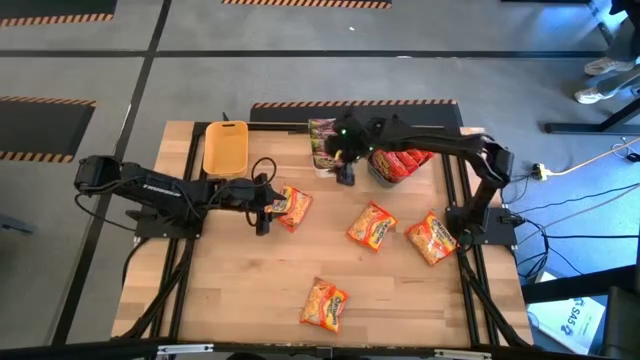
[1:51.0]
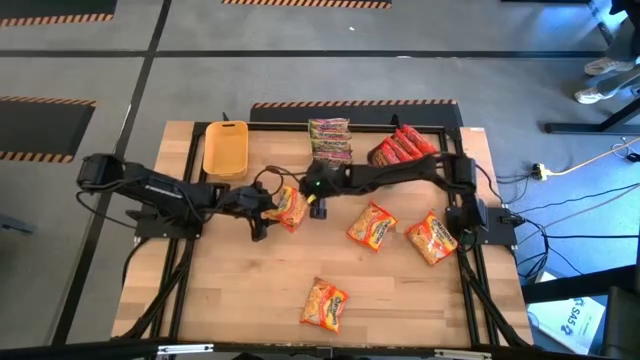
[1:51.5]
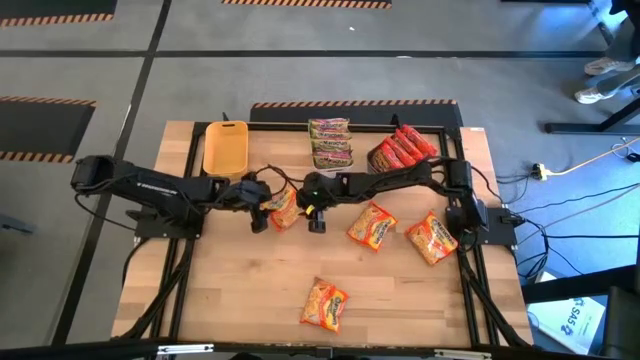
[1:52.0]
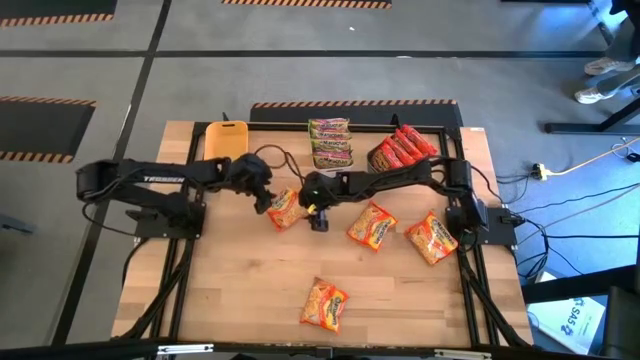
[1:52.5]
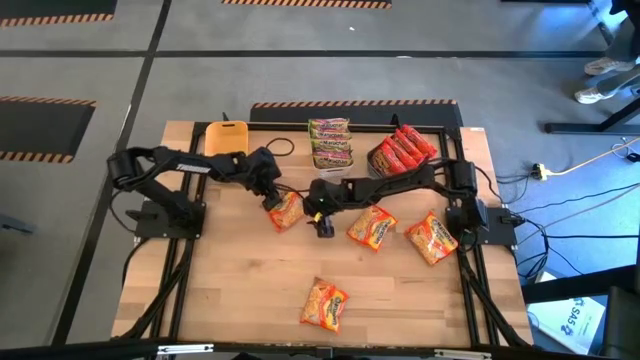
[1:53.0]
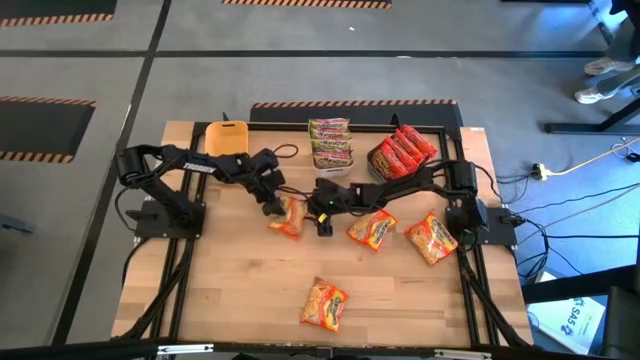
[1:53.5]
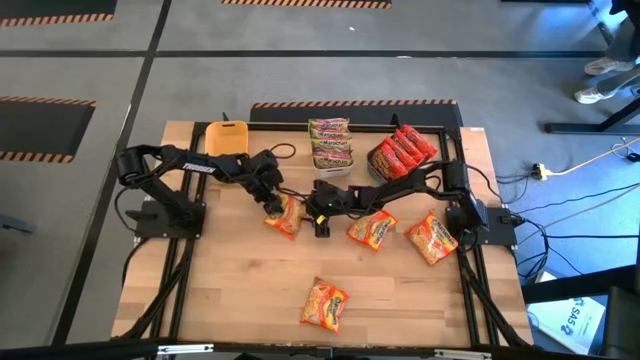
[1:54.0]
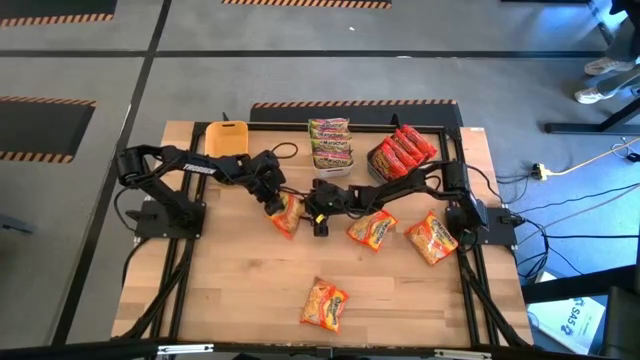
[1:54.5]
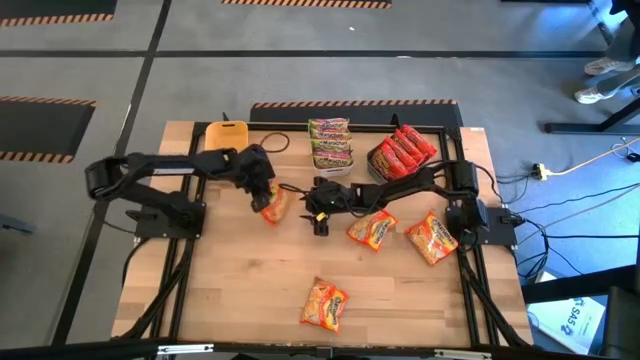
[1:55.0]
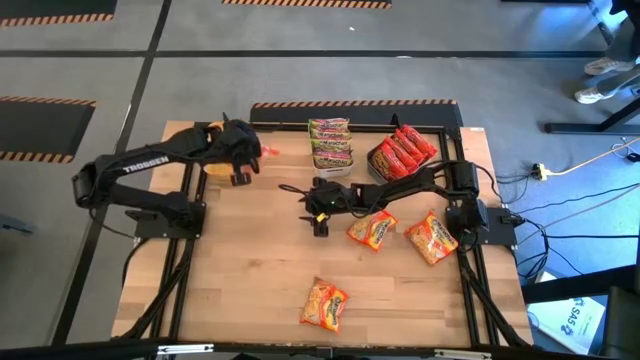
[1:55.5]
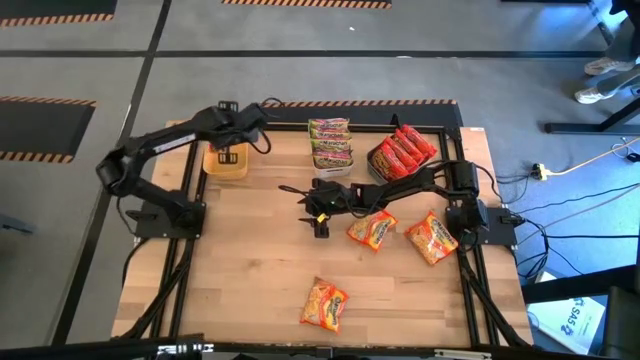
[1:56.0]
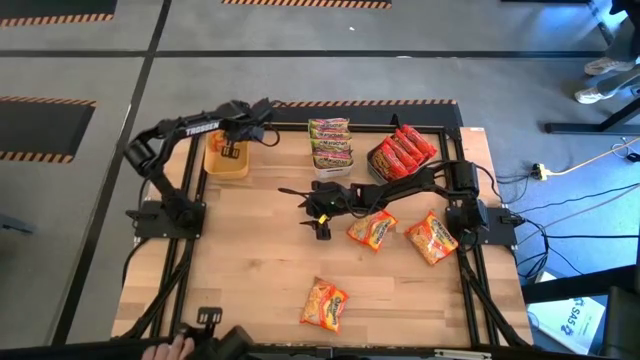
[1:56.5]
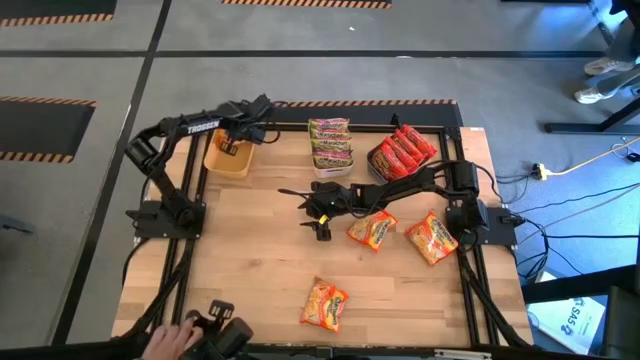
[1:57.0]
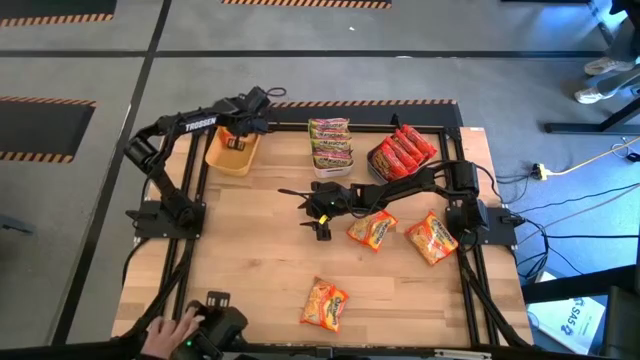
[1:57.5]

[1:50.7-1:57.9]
Task: Sort Maruchan noodles
Put the orange noodle pack into the yellow bin

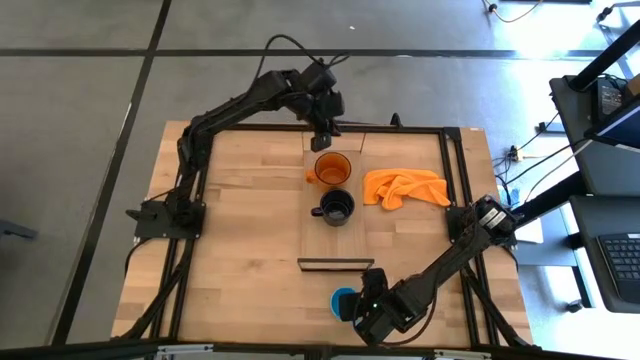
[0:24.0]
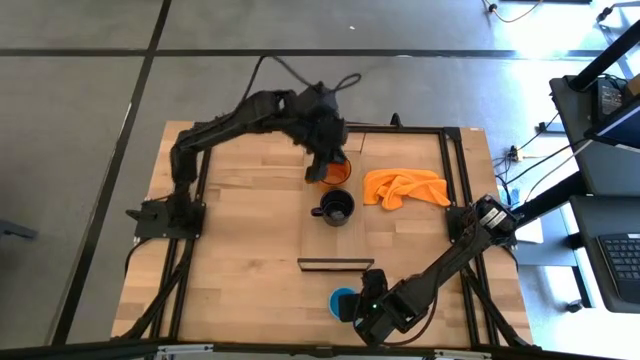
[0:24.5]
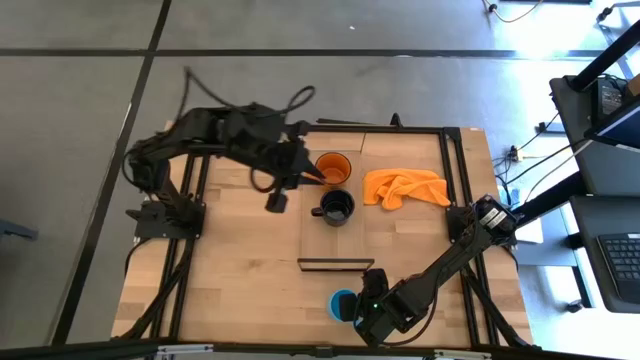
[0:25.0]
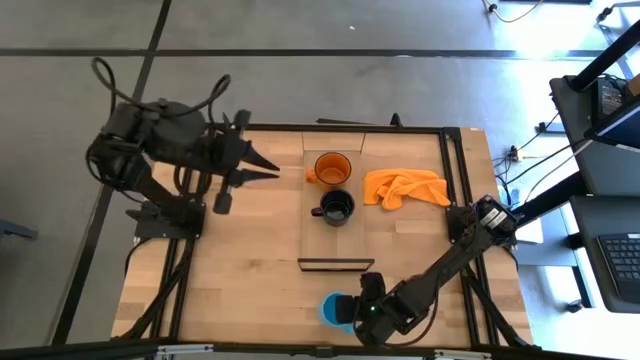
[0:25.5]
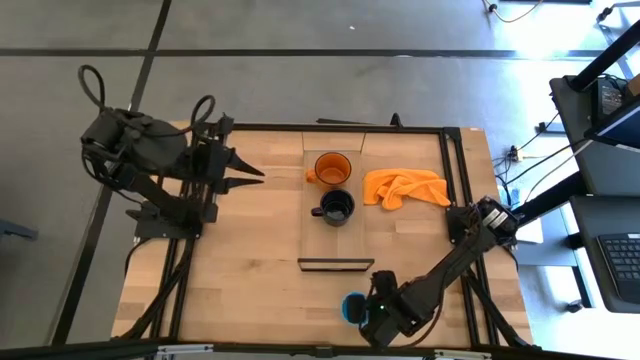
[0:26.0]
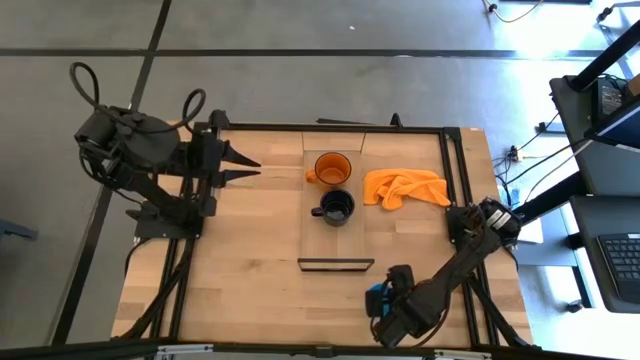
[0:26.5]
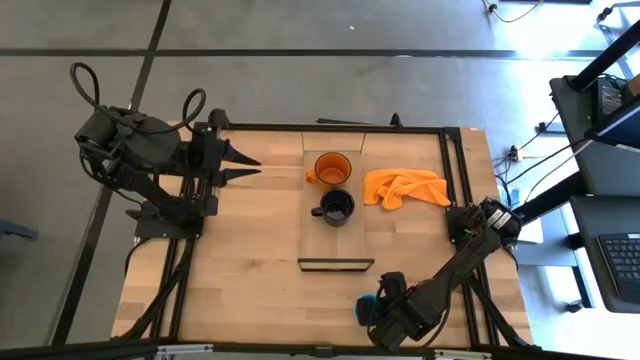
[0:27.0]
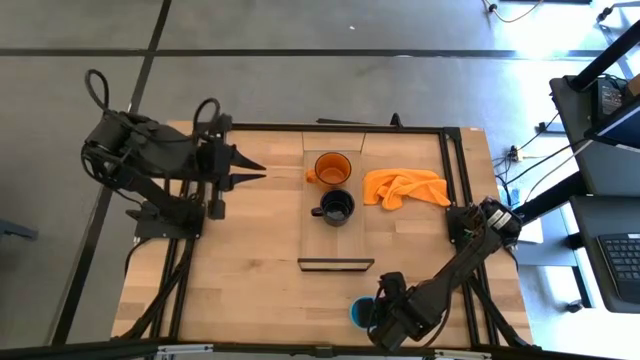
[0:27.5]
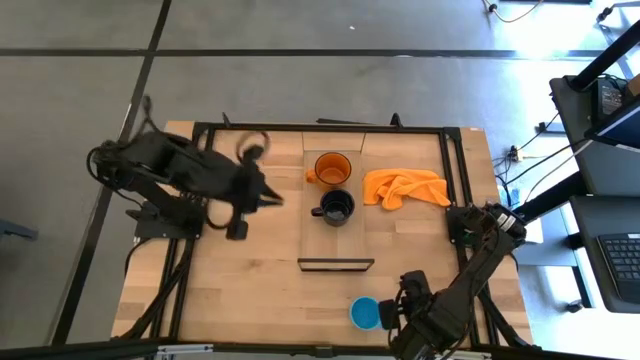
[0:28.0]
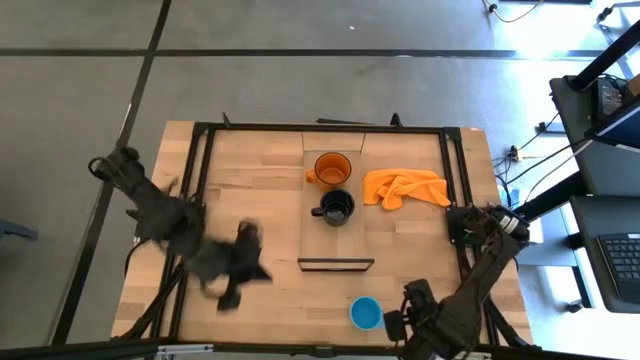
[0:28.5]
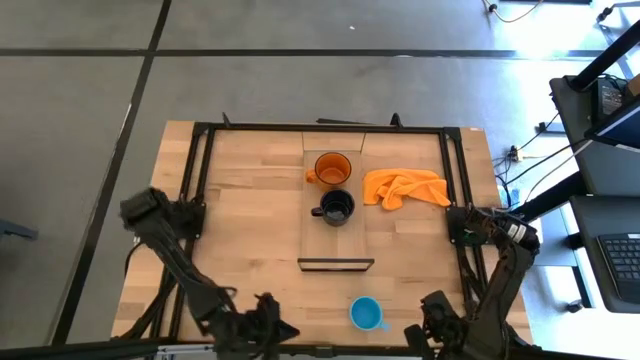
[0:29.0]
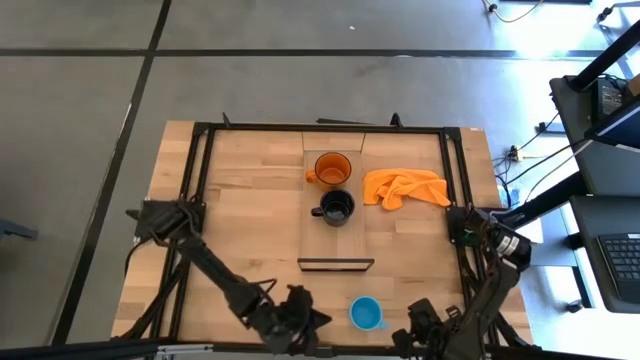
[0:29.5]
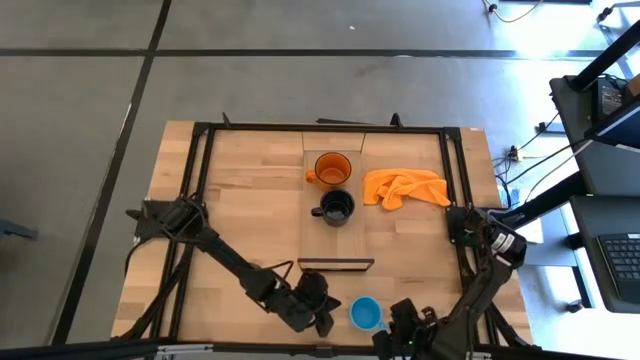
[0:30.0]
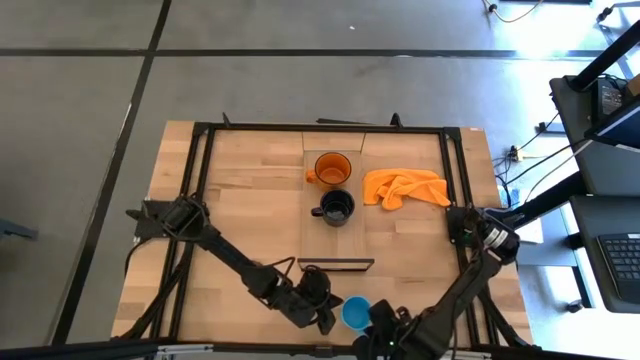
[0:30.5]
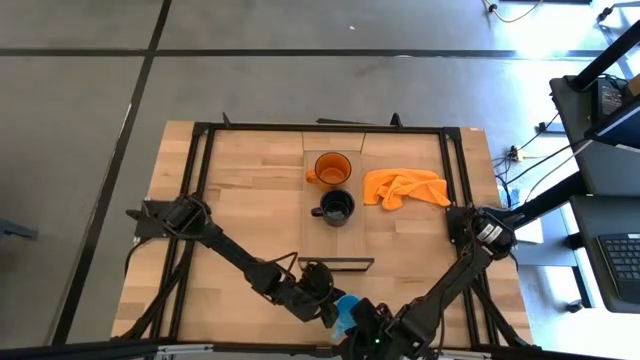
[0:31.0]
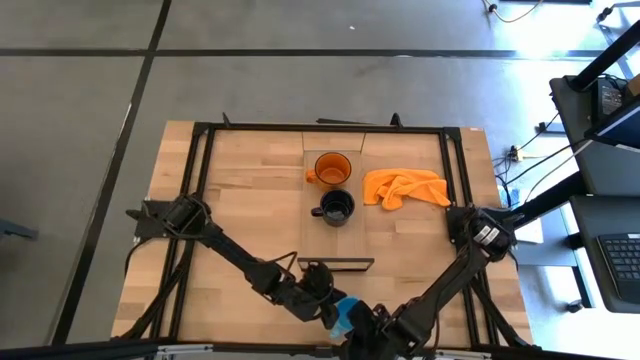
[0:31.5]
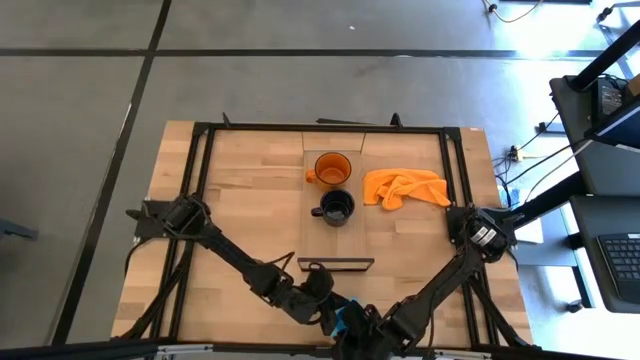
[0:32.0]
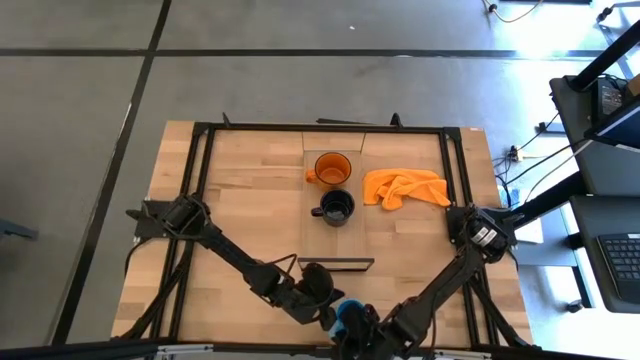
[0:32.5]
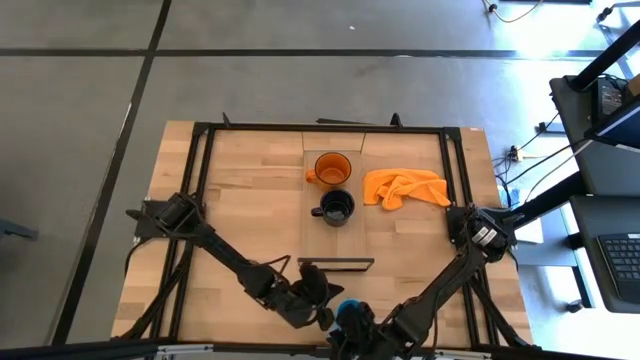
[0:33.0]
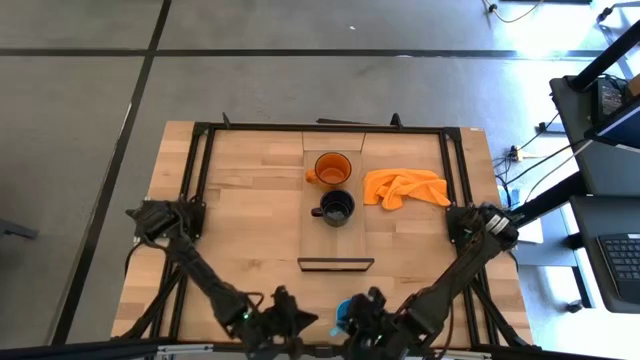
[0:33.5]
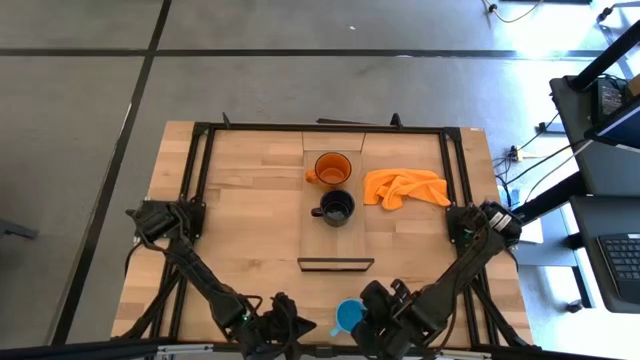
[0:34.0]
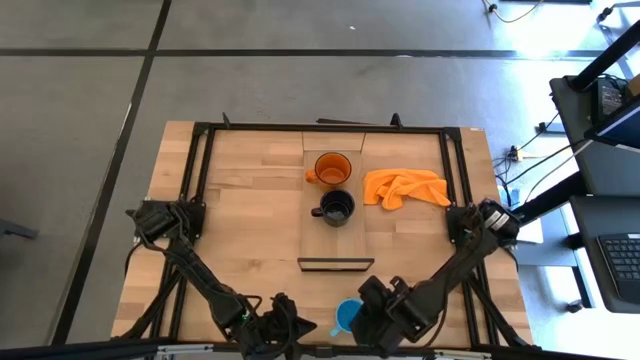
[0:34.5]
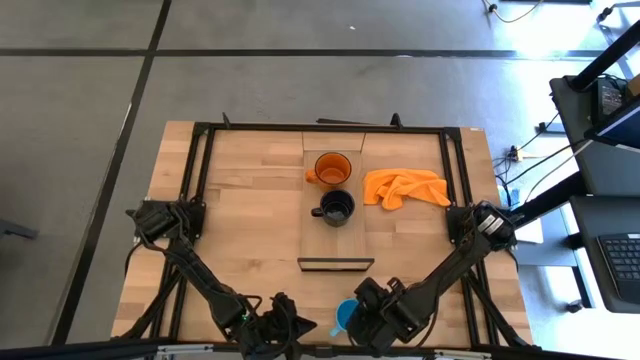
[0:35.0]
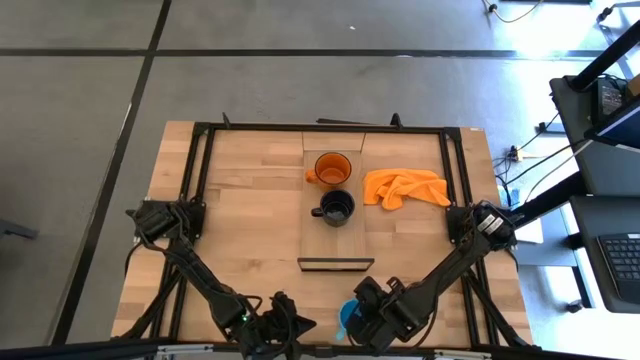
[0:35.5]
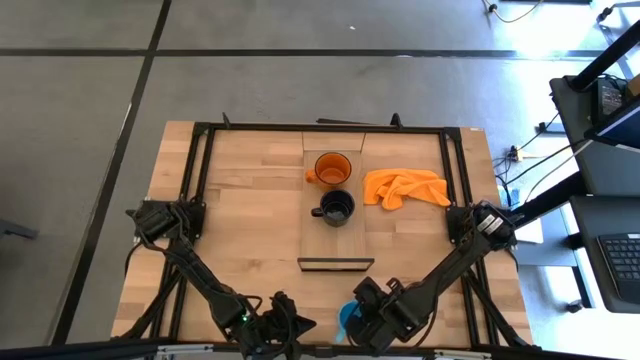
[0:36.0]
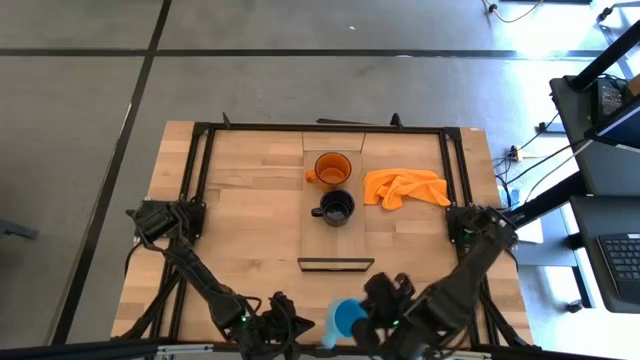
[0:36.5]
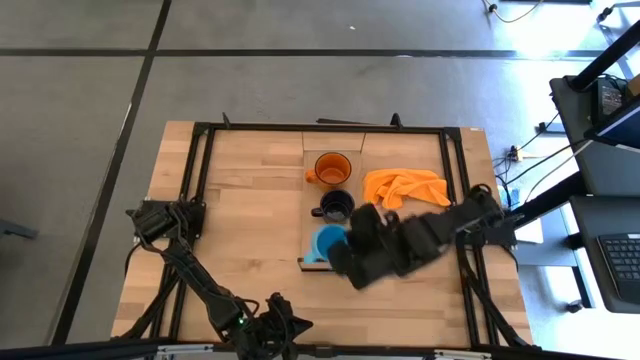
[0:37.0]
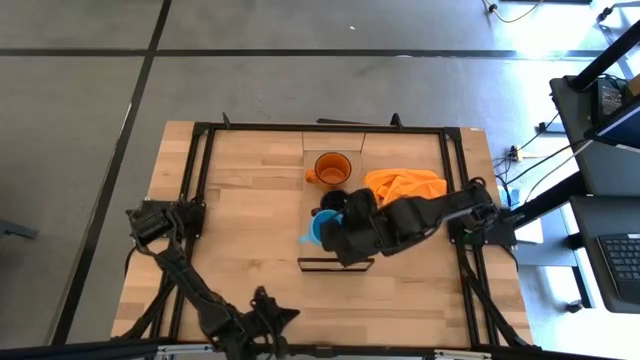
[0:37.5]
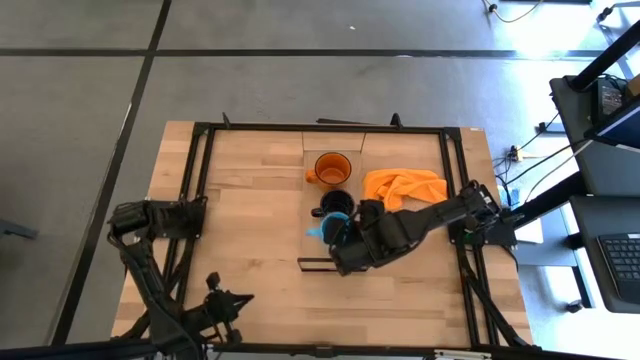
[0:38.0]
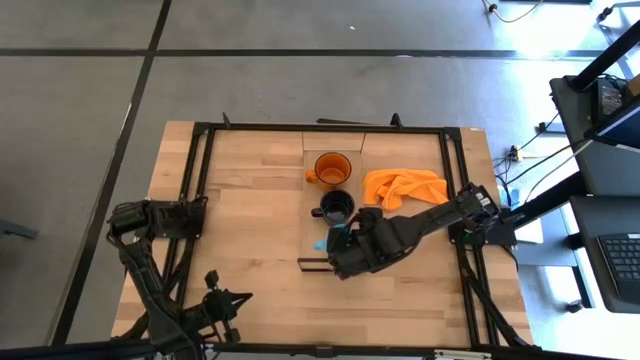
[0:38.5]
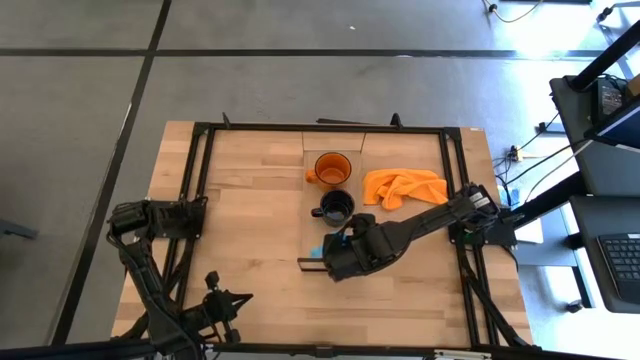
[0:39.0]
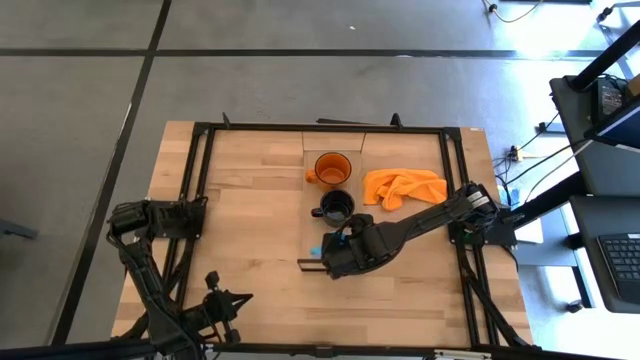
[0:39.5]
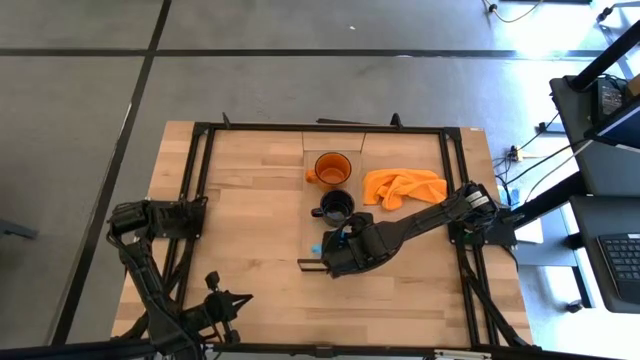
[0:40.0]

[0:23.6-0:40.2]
Task: Stack small to large cups/mugs on shelf
Put the blue mug on the shelf
